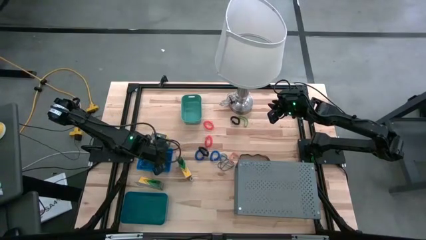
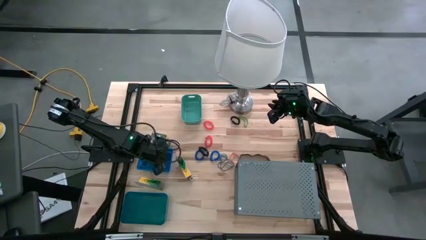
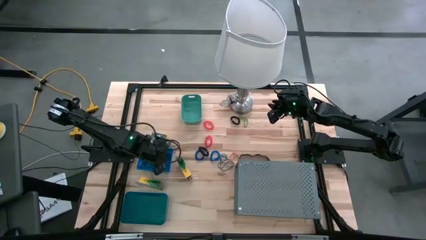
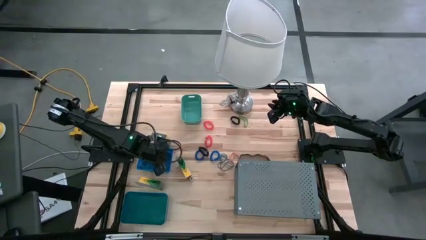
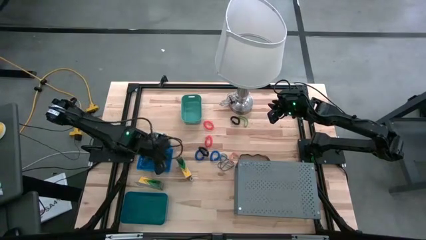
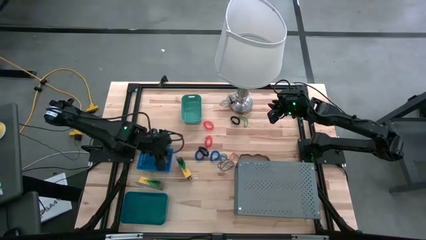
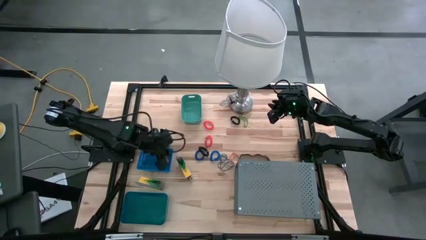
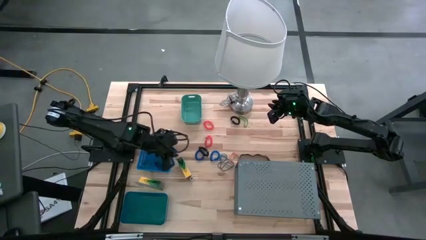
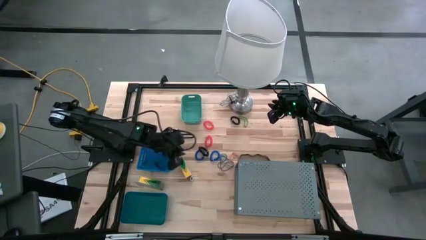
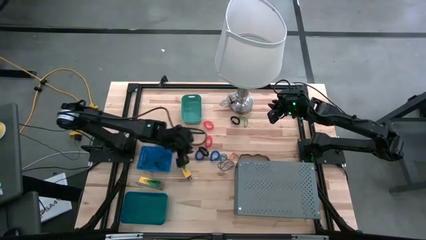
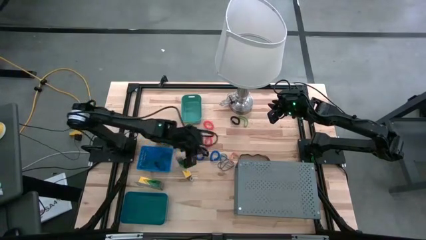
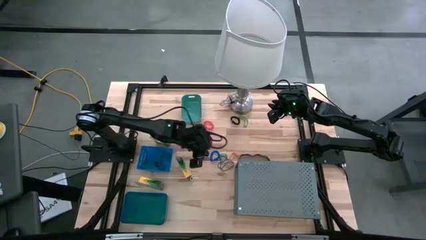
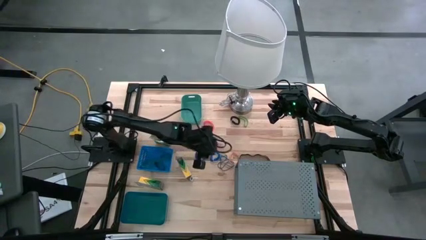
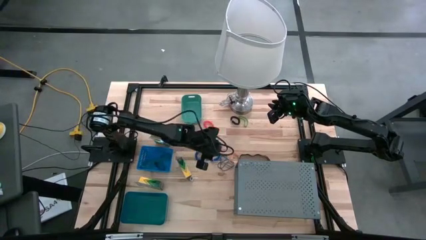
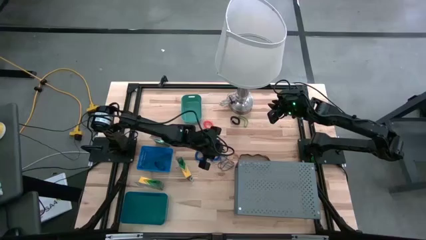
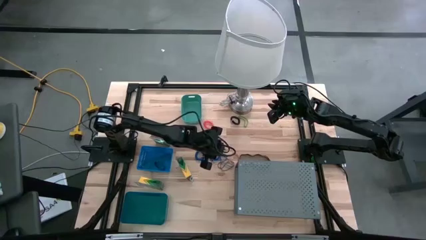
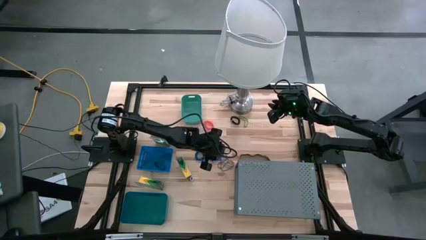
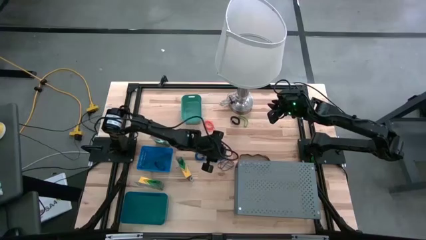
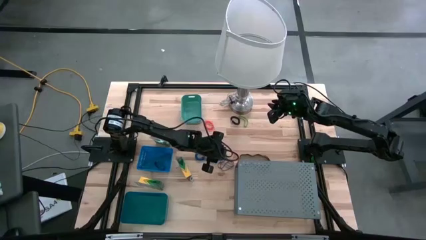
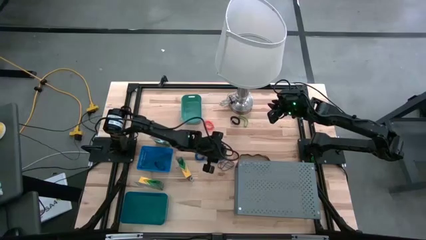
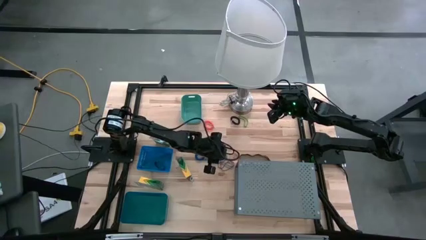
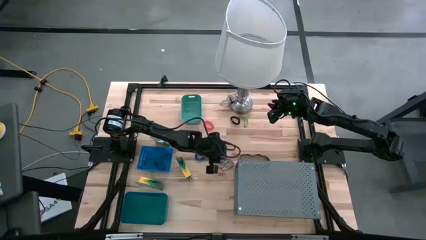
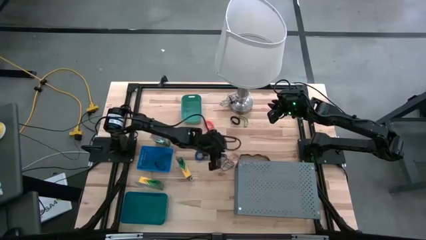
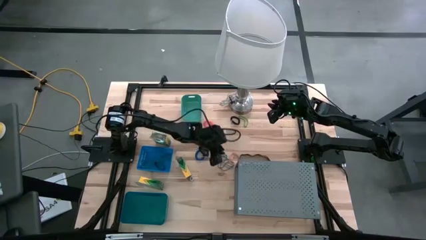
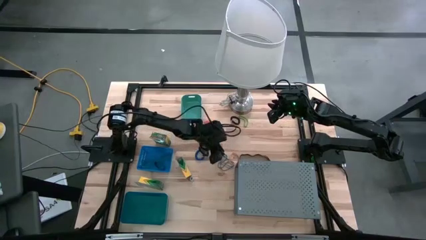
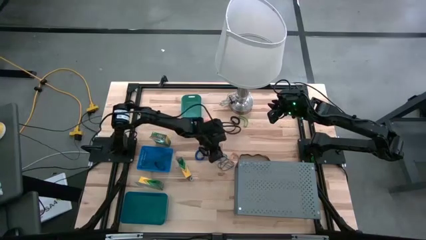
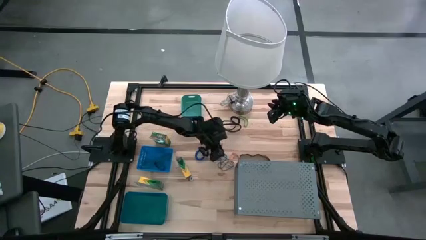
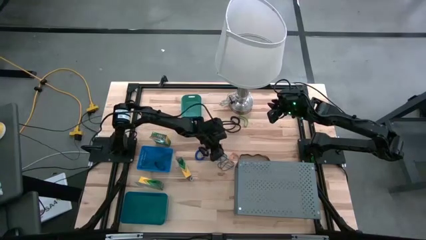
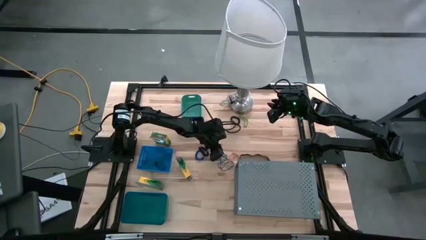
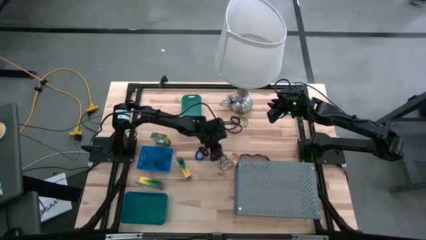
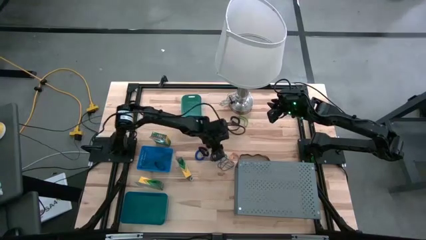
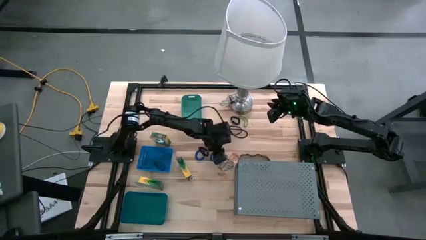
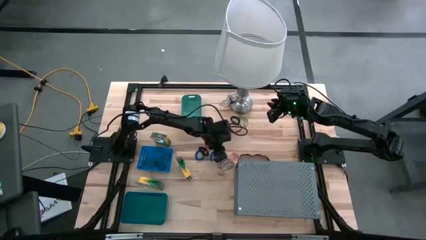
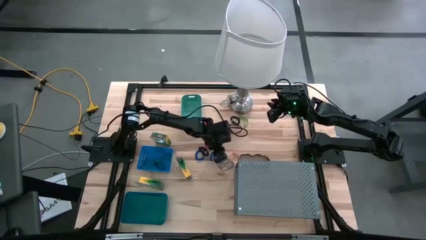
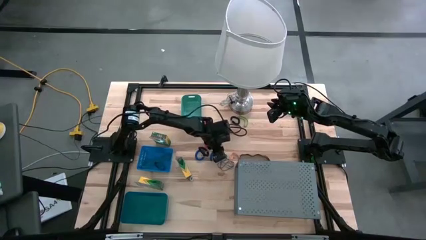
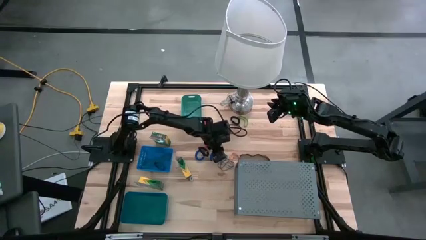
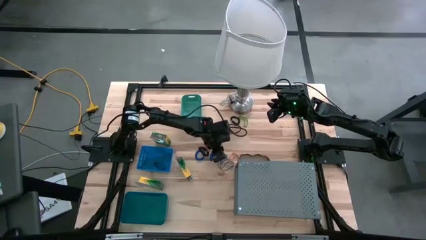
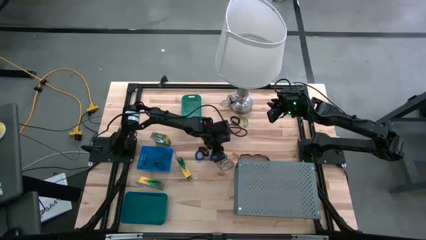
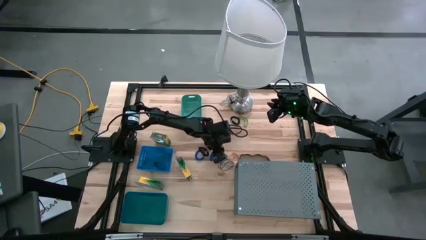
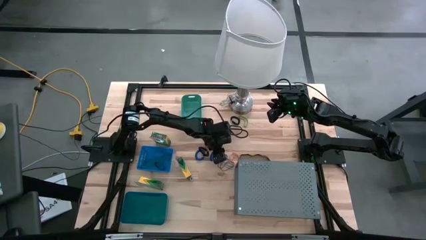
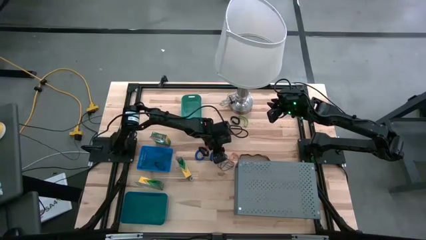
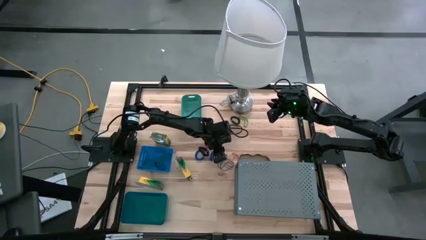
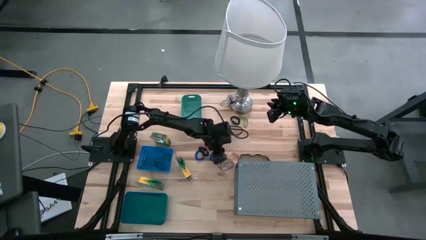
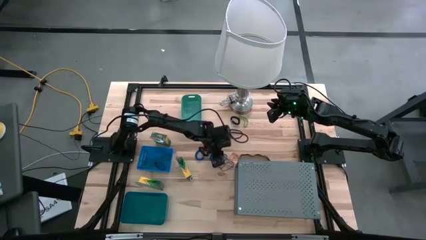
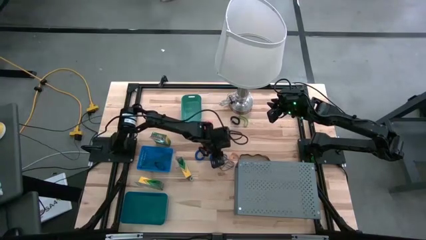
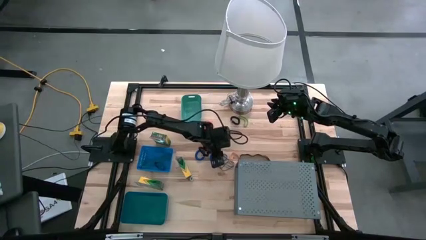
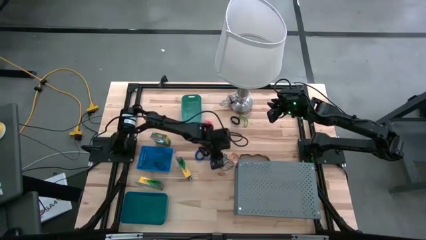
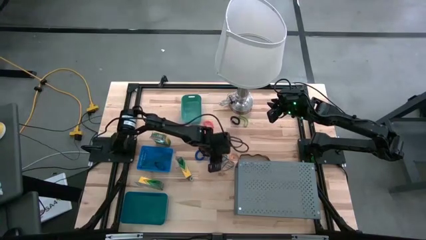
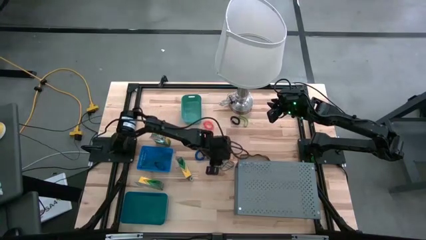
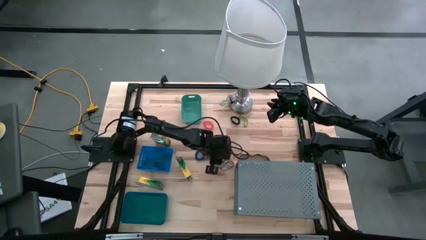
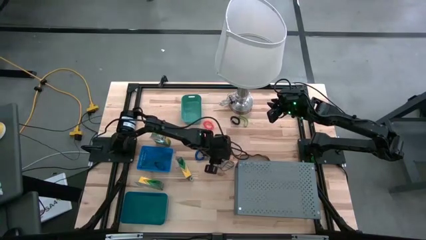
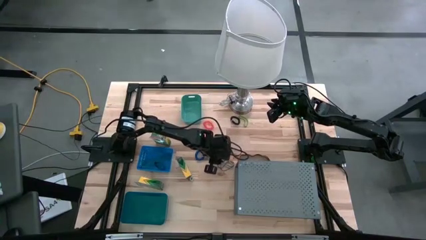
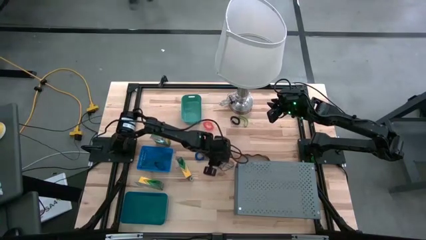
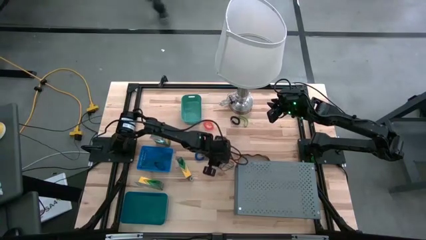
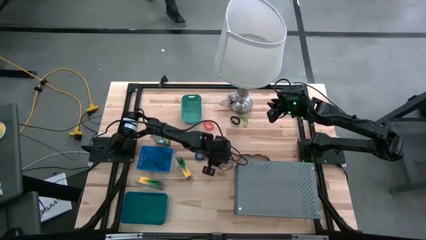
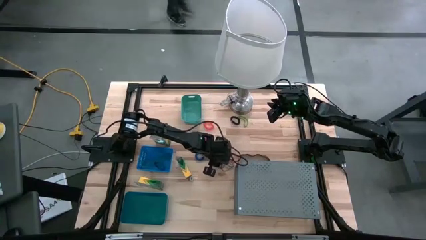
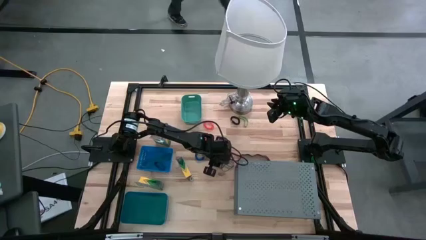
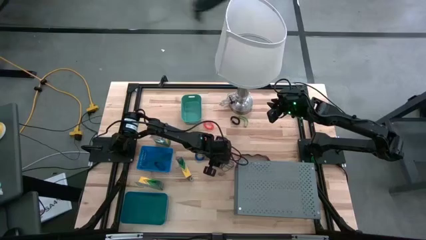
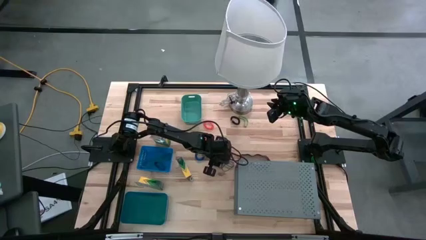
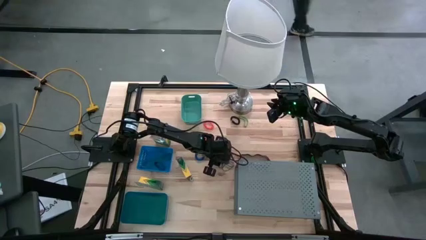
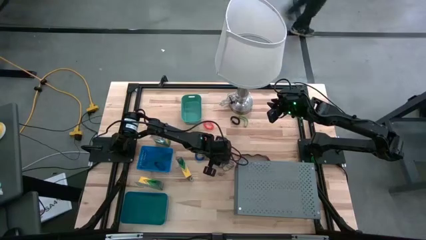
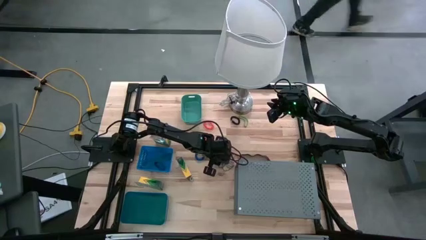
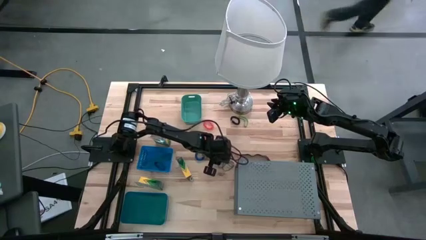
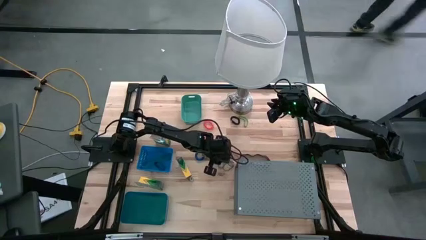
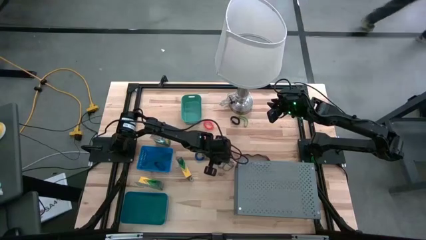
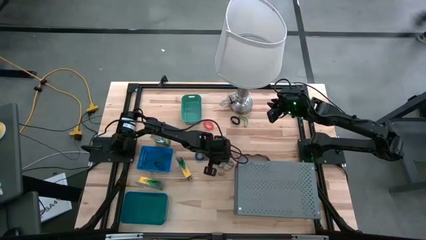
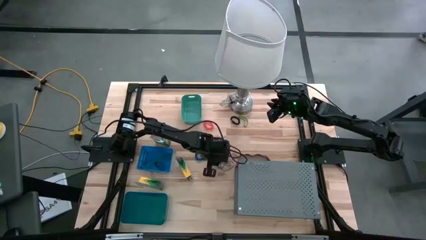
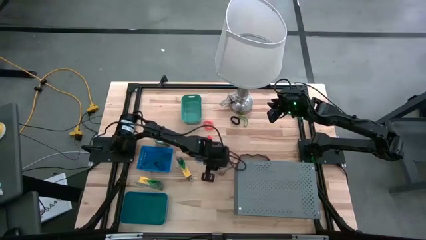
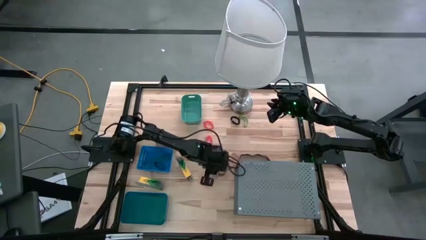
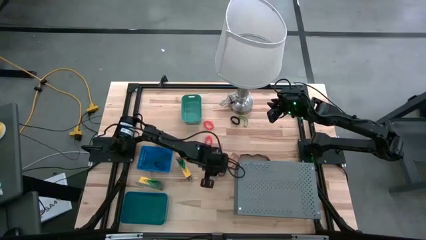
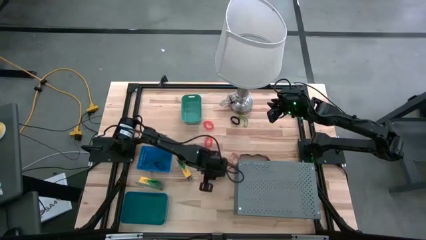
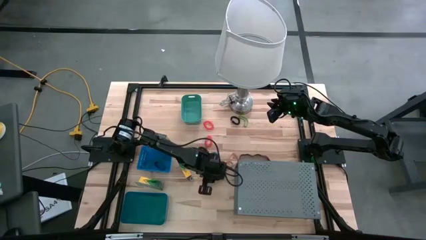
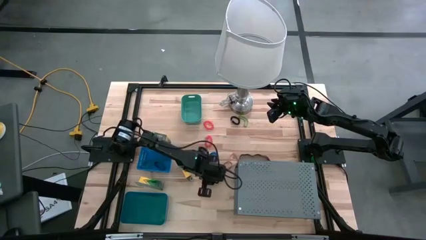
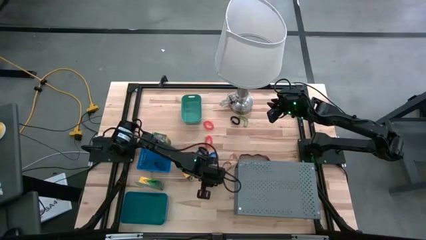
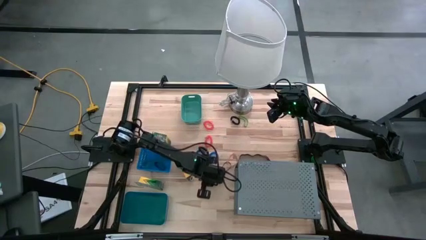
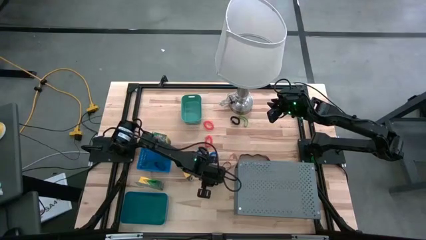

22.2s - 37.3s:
Task: Pick & Place Office Desk Supplies
Put the blue rubber bands into the top blue bin

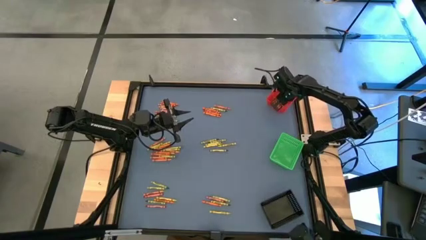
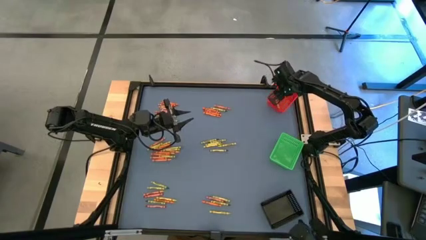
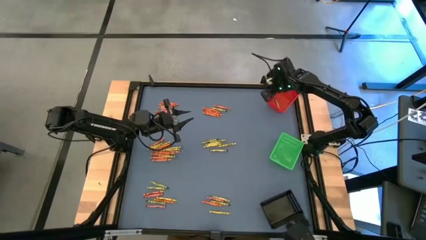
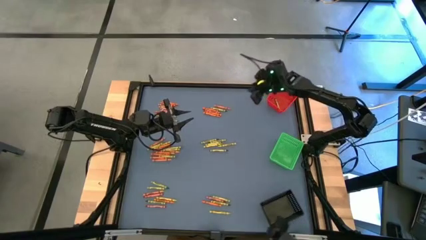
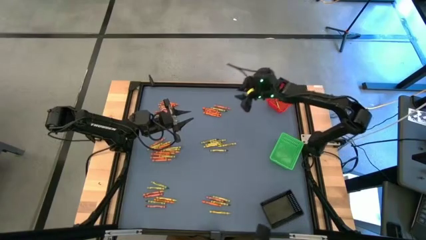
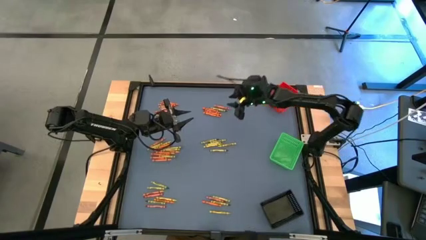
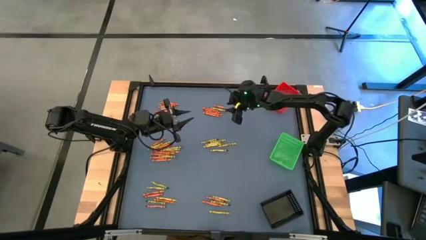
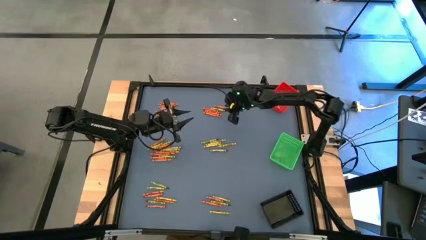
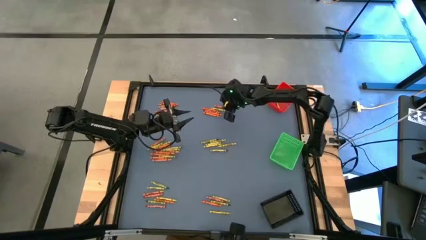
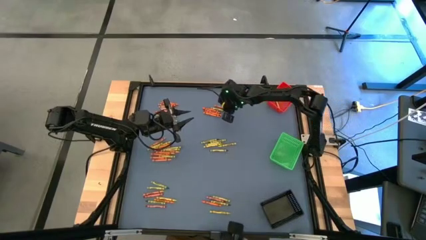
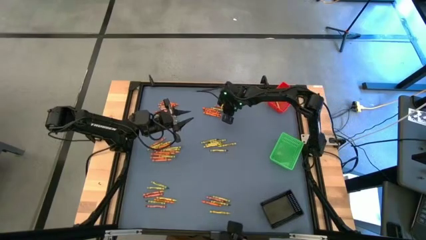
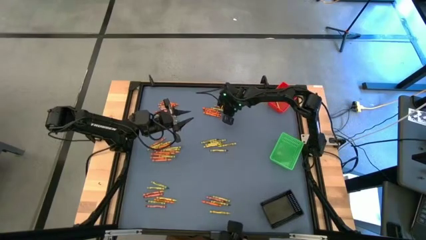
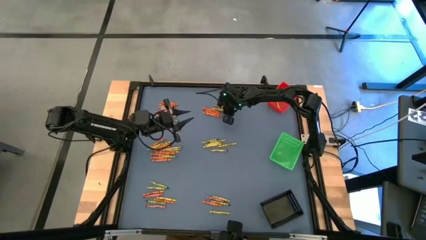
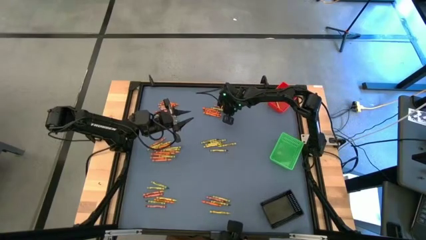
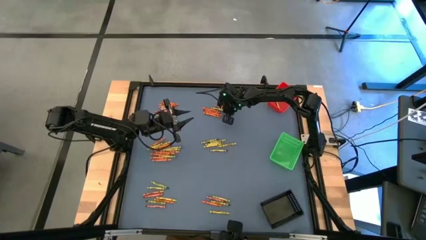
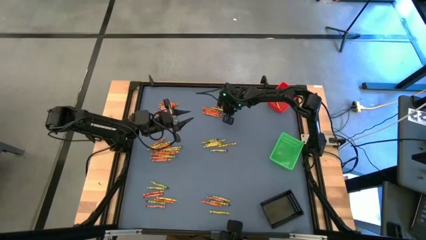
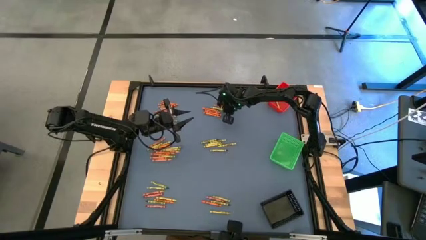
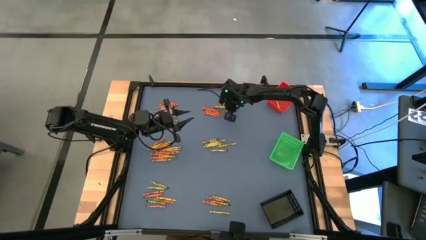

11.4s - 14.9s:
Task: Sort crayons
Put the green crayon into the red bin
